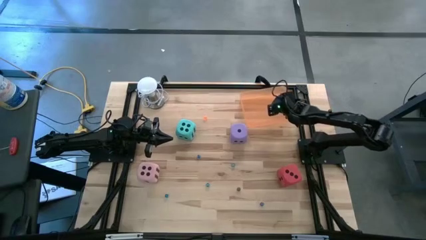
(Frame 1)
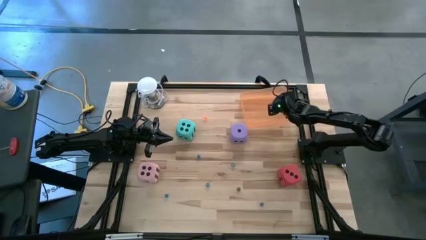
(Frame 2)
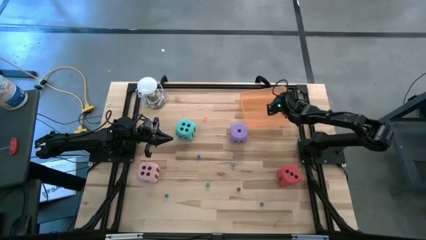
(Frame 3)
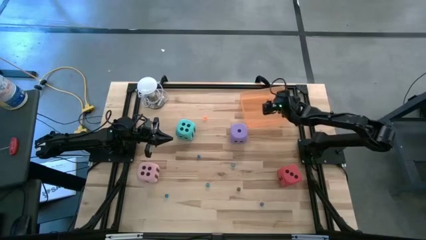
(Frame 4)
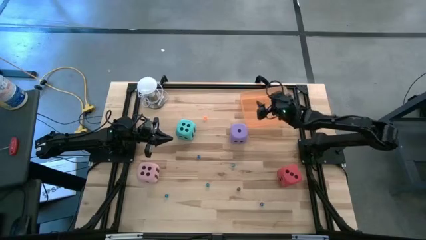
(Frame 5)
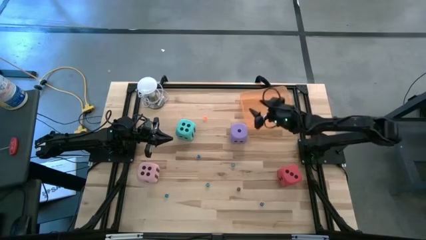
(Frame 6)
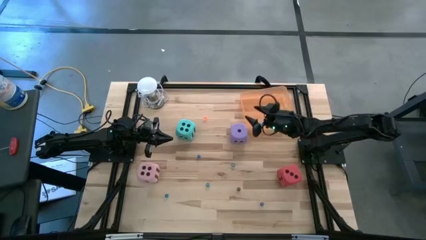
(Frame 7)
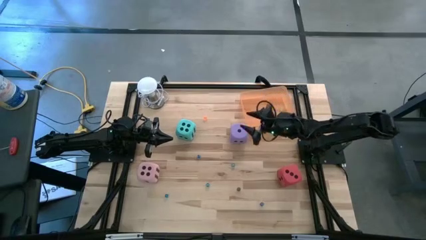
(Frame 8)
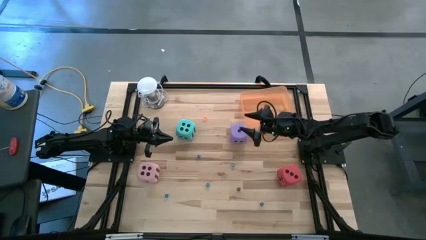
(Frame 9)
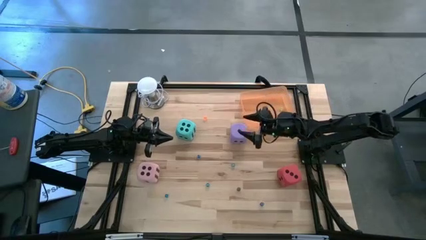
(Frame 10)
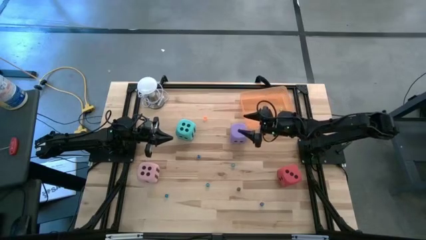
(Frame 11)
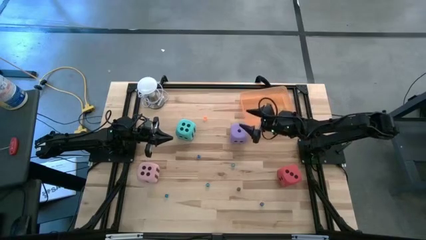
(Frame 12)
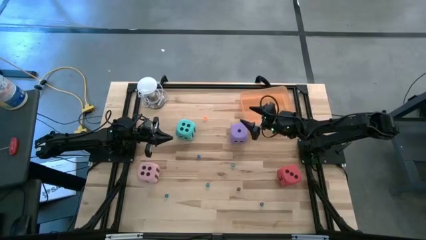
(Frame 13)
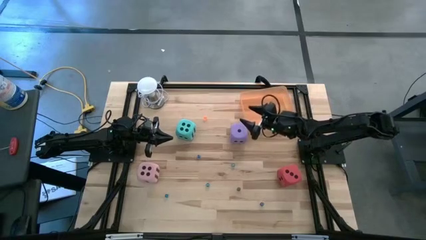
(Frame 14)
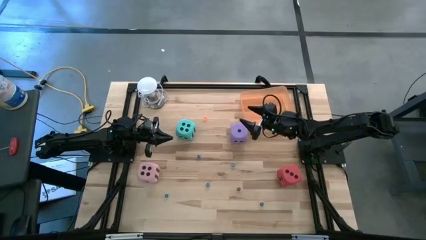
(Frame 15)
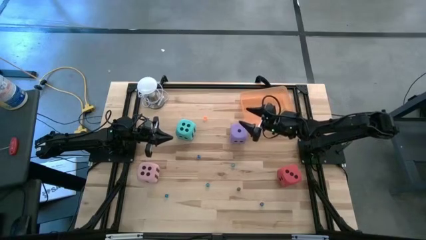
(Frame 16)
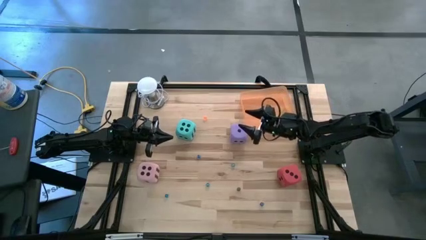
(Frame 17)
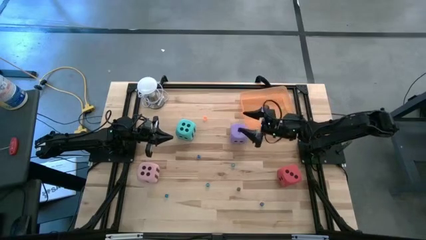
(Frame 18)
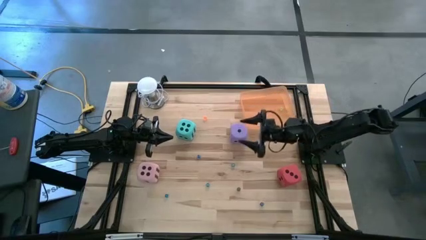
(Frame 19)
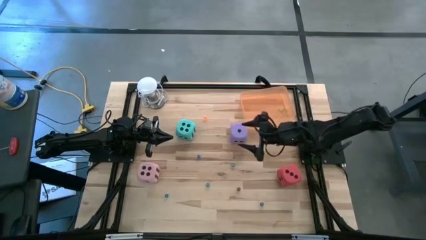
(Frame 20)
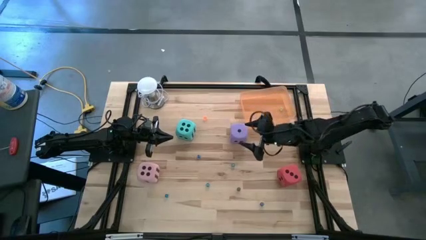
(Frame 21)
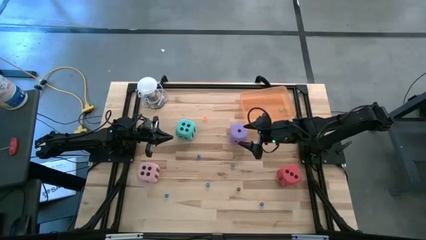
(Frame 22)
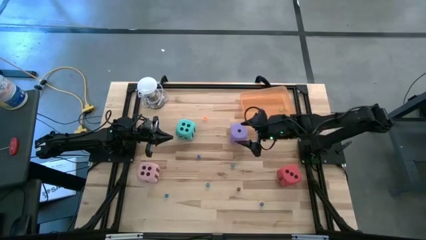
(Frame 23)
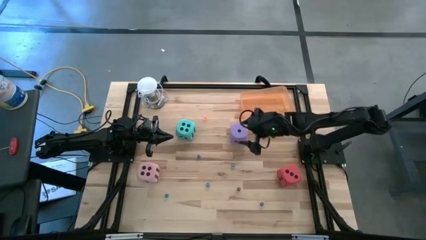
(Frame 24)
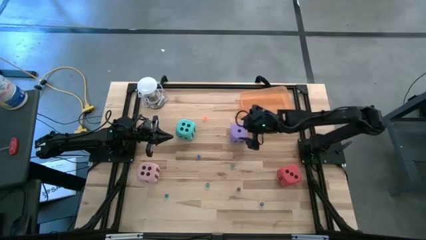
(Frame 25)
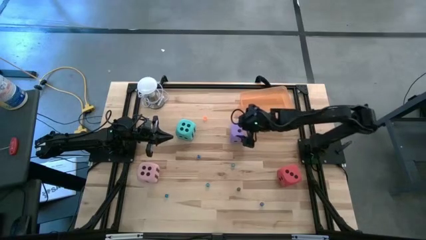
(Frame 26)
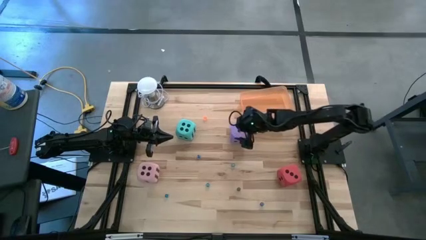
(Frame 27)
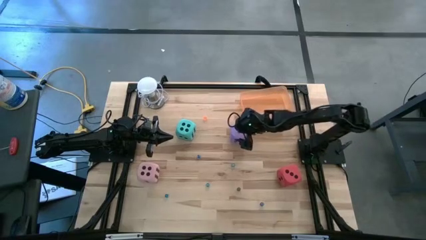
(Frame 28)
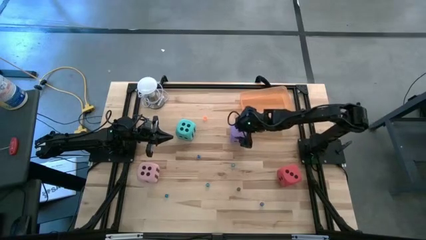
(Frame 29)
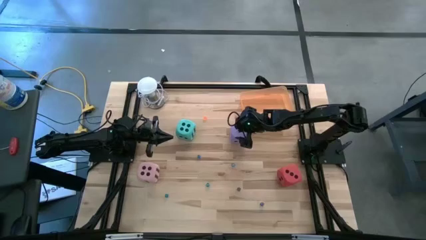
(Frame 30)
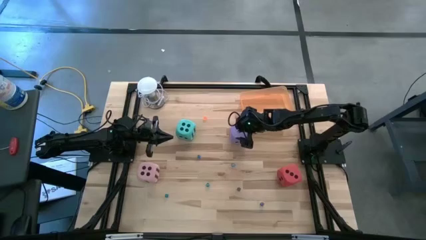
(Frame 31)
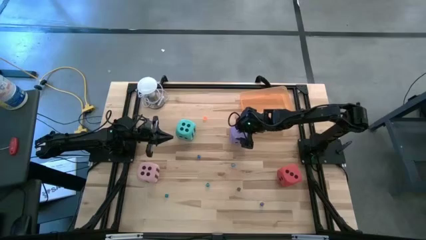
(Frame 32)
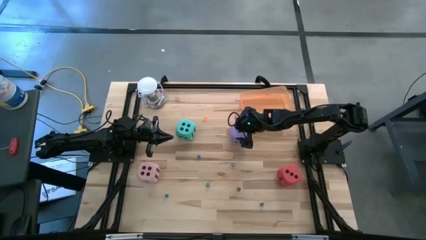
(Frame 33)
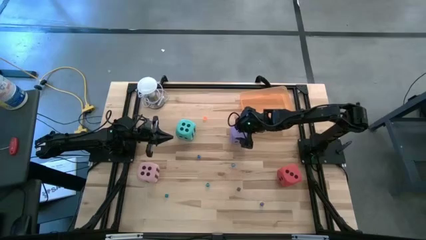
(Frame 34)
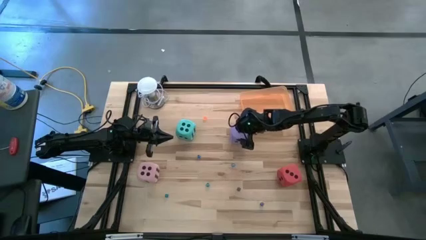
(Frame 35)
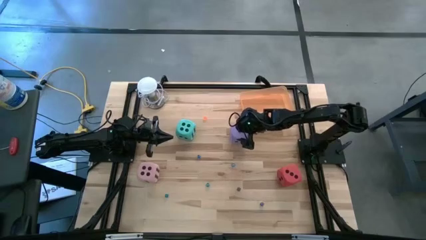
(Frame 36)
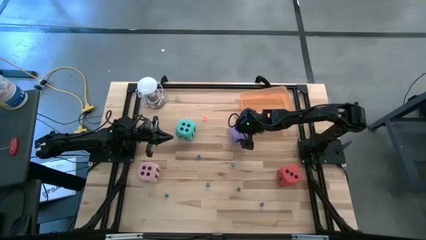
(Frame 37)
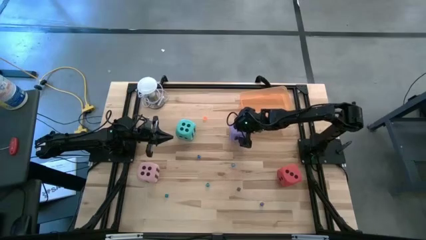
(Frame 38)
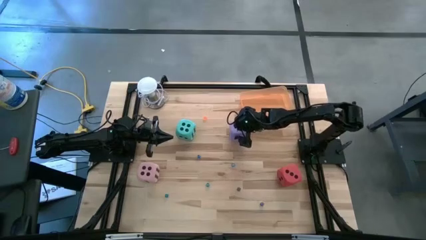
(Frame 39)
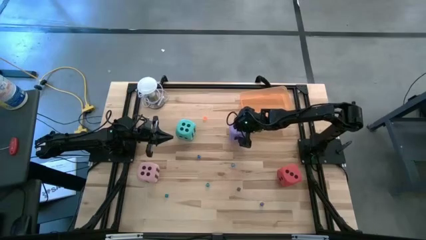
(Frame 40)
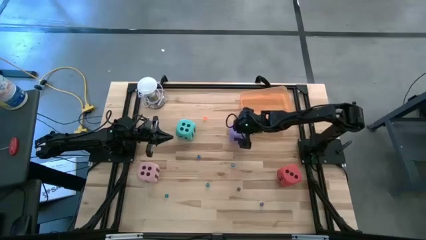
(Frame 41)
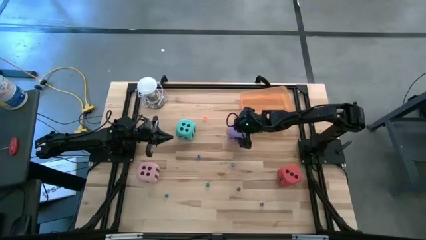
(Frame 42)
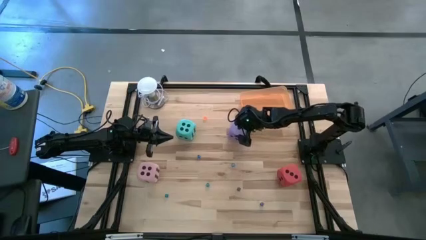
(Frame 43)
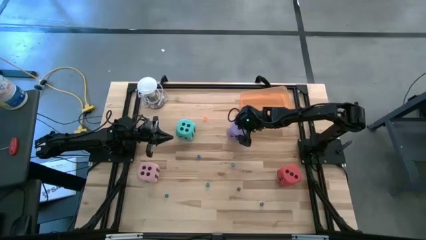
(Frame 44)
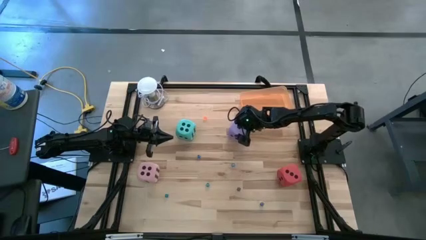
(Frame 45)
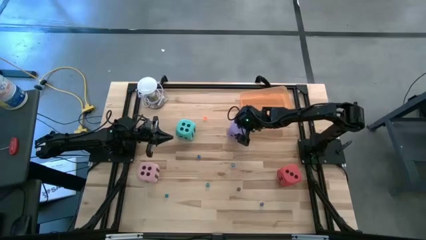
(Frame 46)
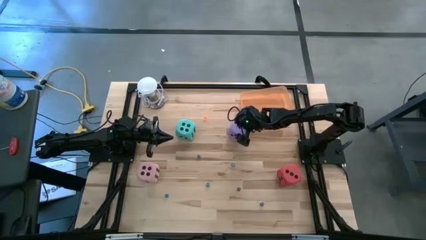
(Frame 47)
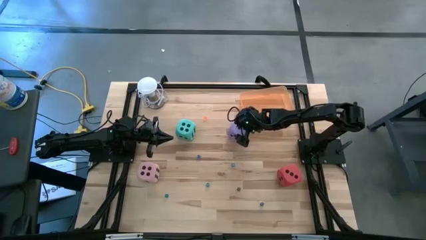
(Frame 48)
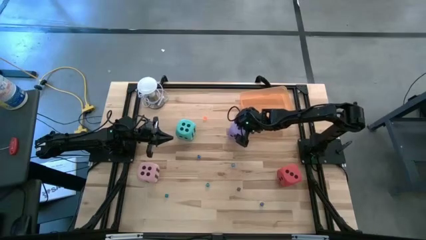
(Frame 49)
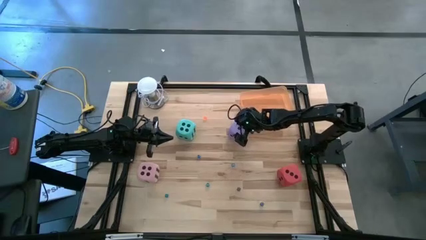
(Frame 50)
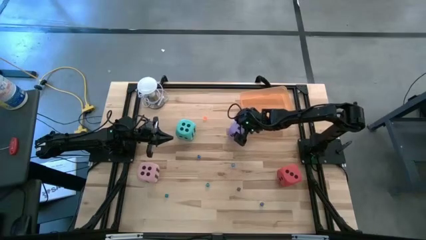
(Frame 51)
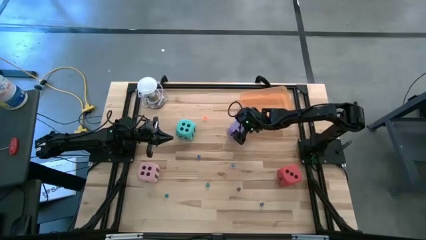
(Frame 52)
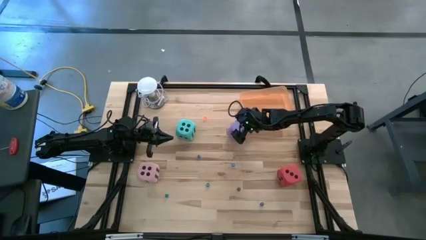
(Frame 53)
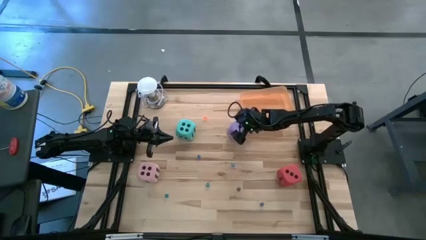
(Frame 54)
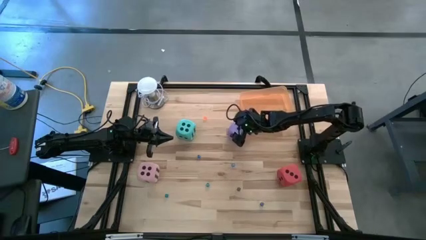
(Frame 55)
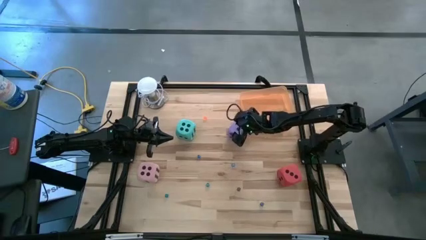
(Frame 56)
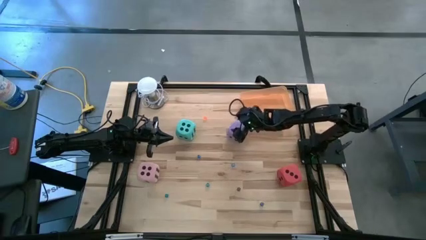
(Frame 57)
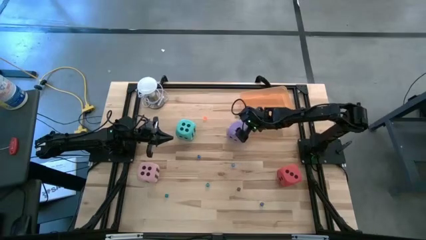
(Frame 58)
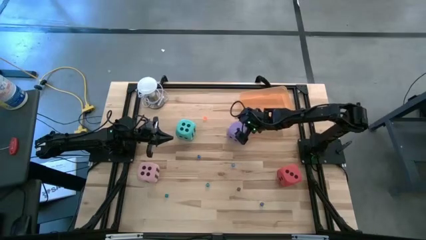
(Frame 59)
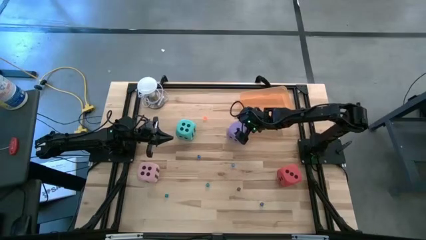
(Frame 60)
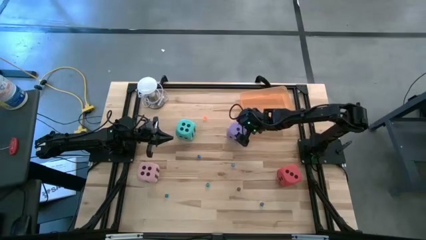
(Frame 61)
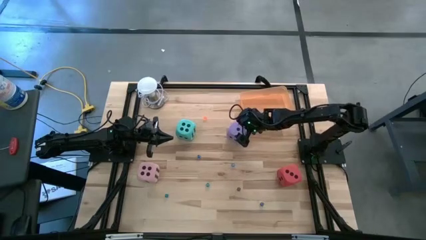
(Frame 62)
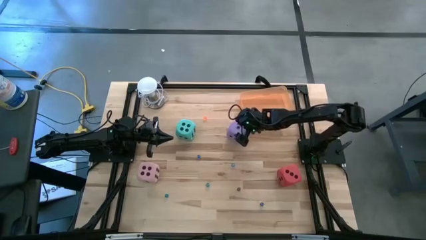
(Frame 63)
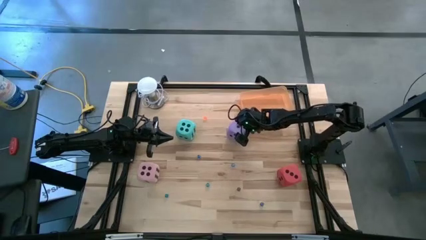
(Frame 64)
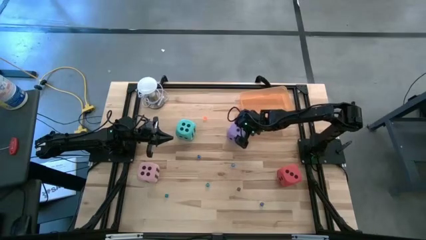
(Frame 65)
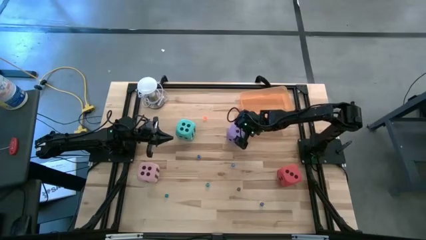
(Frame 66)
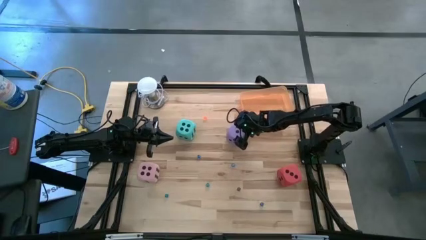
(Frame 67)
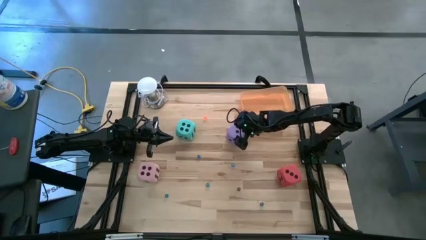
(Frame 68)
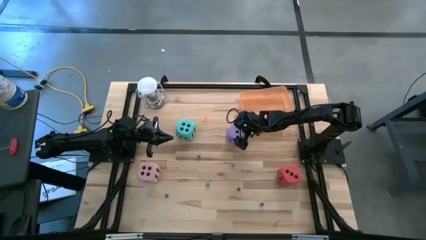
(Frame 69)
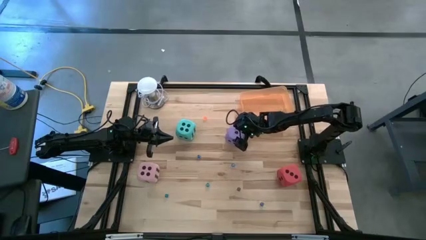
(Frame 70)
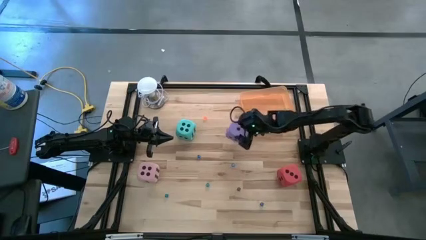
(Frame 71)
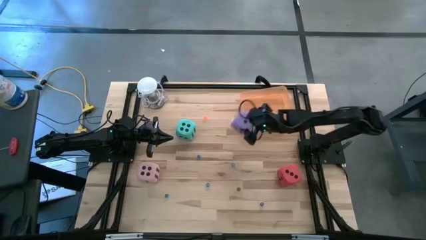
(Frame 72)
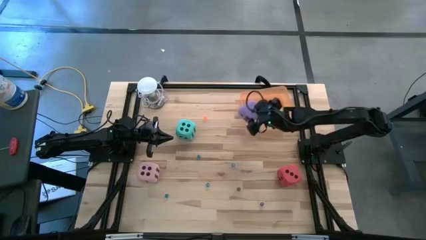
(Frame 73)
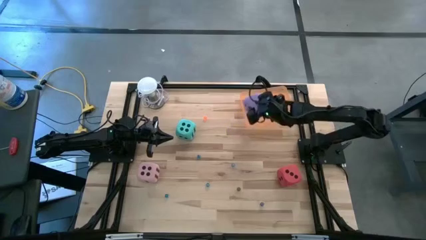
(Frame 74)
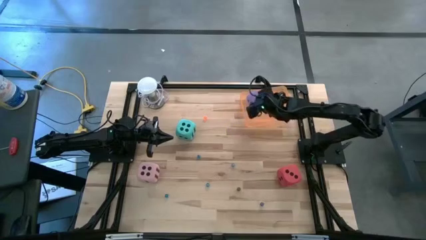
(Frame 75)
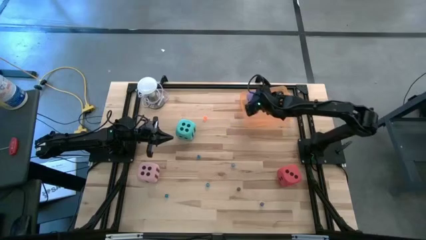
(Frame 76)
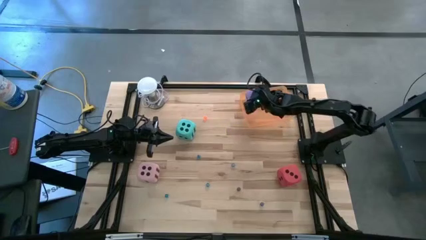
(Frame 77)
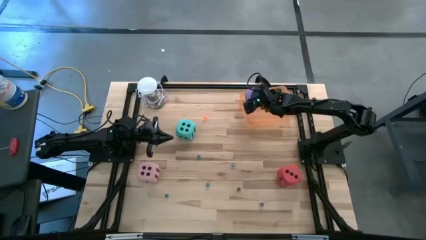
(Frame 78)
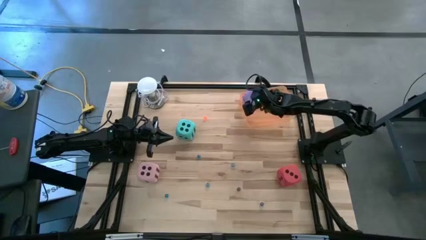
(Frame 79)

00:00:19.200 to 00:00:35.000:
Task: Pick & Place Dice
Put the large purple die into the the orange bin
